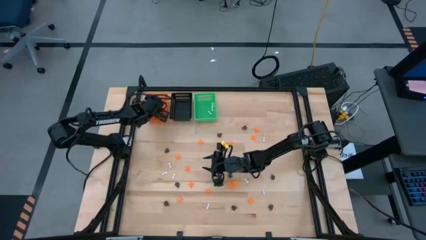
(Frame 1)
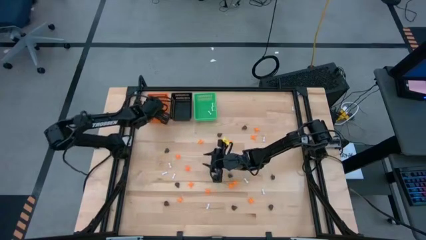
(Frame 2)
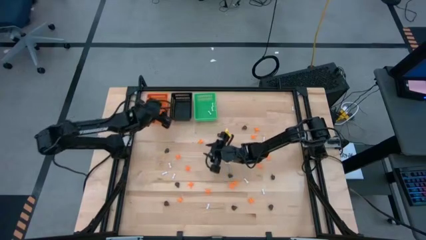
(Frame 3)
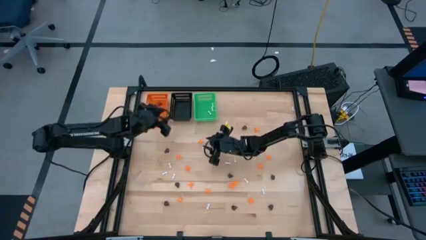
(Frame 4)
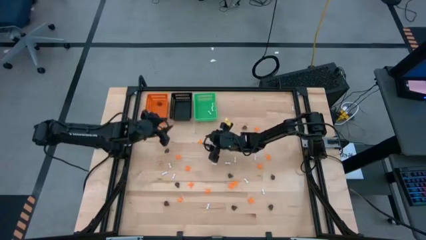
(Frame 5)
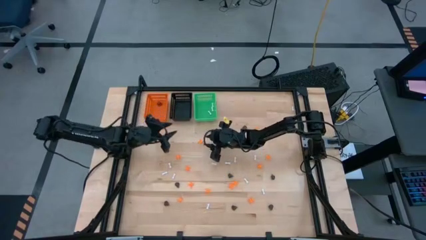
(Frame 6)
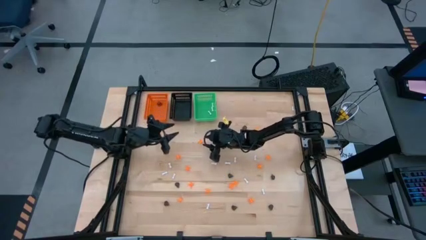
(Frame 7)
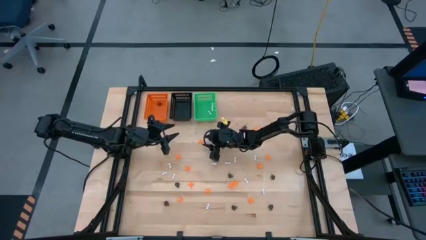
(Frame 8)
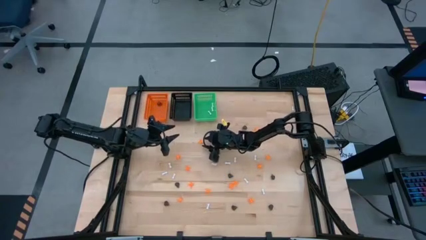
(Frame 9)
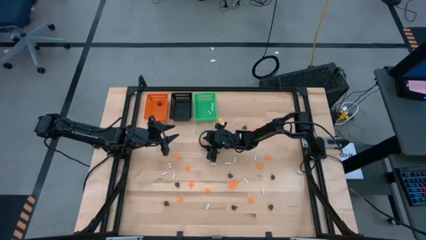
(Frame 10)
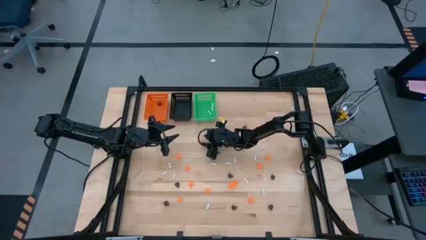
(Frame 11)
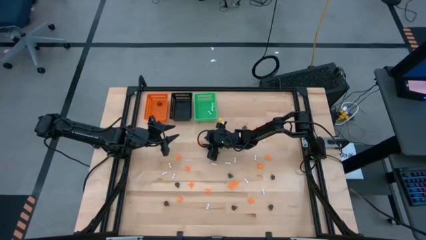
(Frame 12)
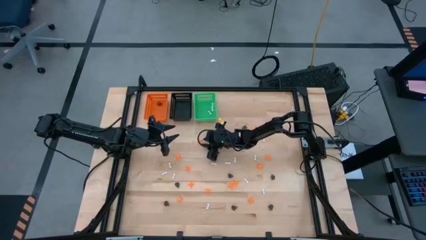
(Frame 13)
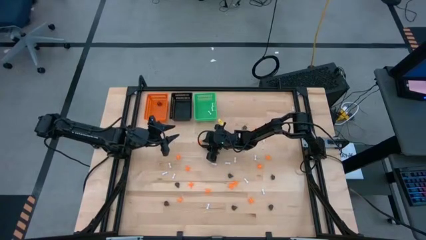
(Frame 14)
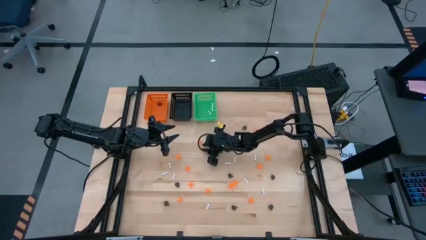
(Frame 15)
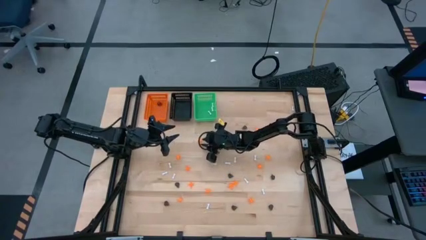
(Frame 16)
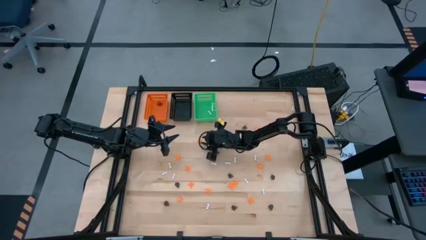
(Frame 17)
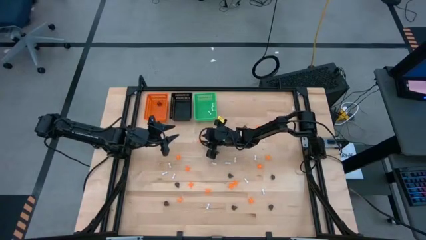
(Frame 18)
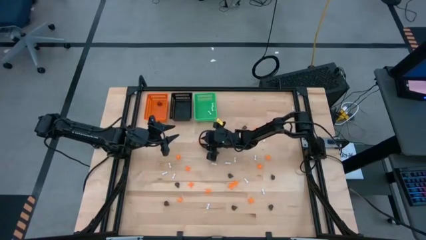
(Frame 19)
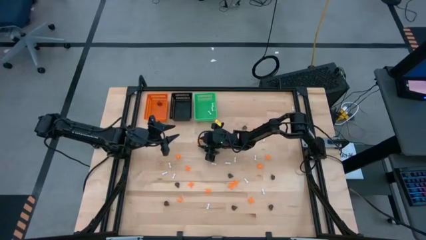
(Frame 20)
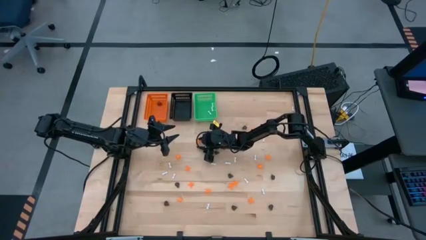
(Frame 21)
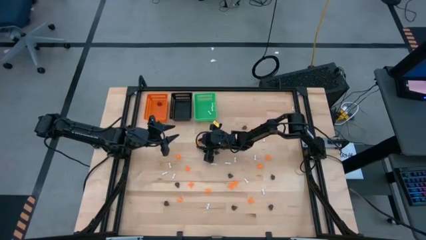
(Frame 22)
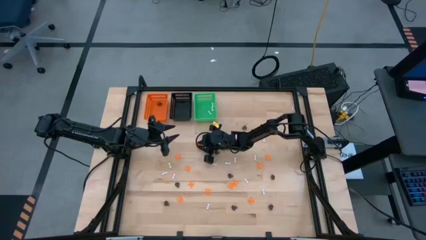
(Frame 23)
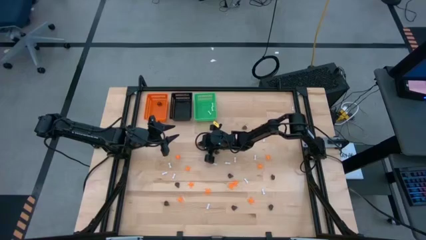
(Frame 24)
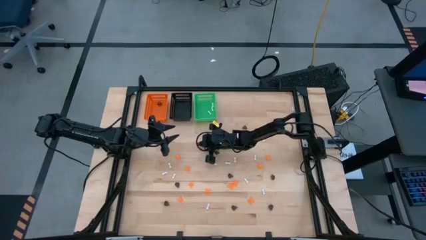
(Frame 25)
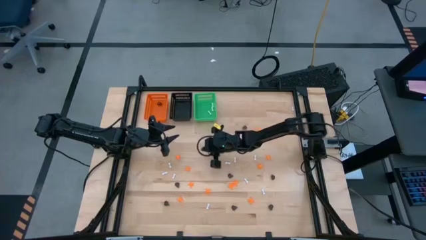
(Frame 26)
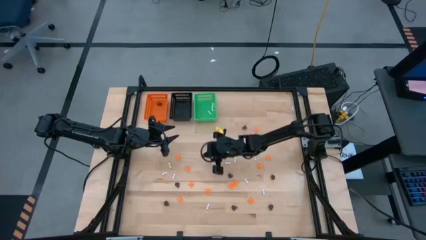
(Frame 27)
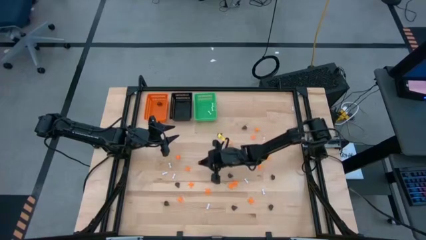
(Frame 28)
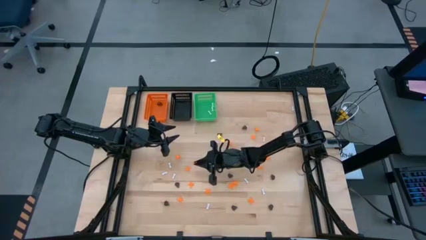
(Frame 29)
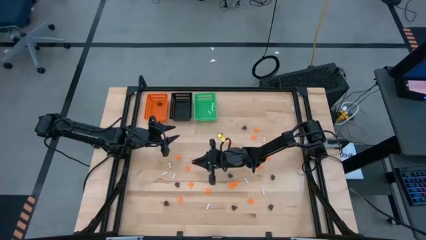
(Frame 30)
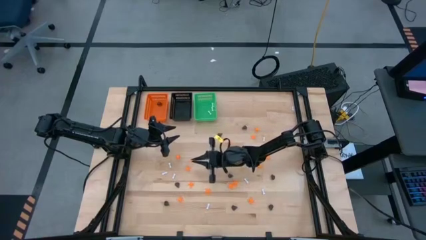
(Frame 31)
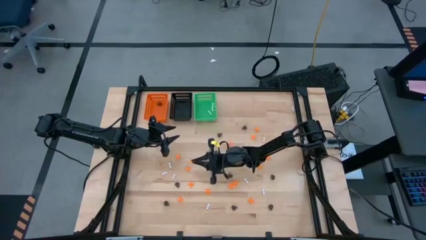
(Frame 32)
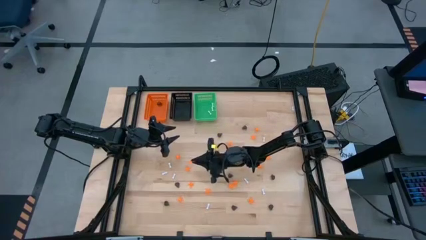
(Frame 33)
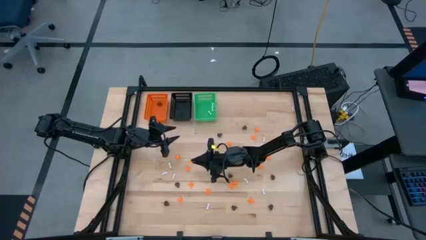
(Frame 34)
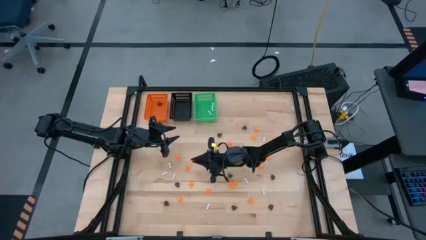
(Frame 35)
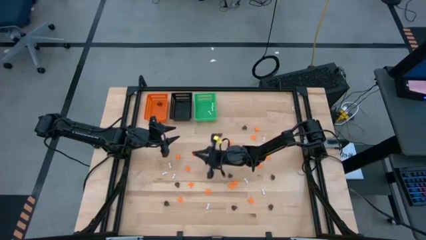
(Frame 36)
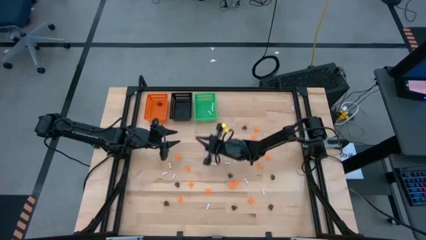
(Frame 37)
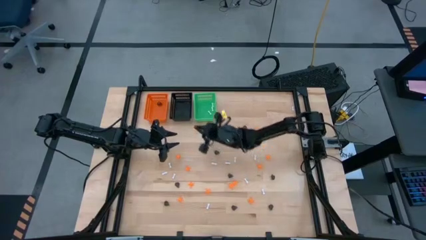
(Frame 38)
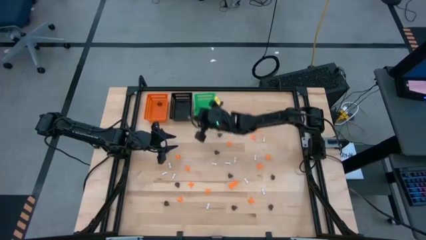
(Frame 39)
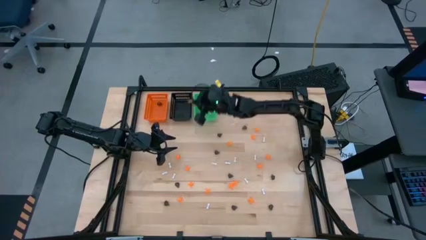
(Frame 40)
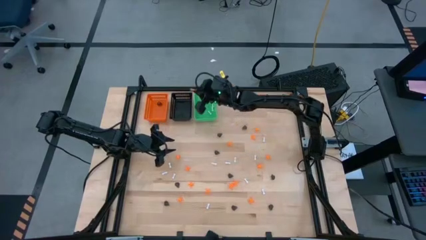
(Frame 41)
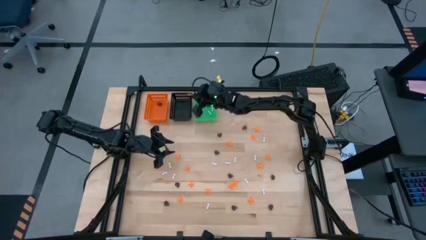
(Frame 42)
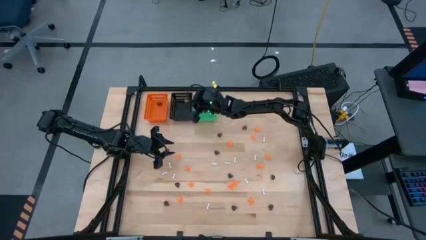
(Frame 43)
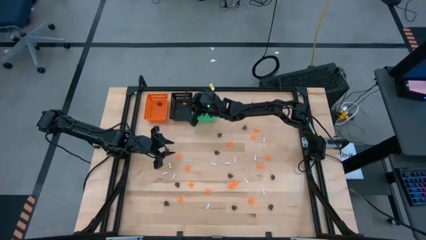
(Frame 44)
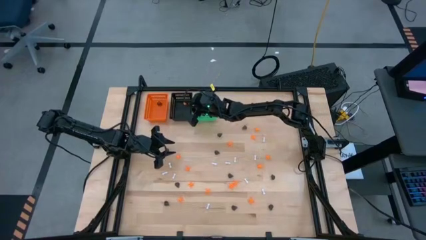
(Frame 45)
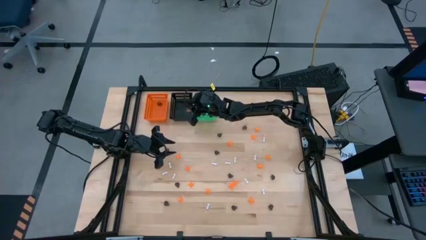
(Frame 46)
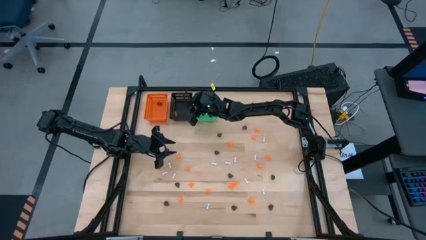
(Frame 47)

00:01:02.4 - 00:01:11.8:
Task: Sort Halloween decoration
Put the orange spider toy into the black bin

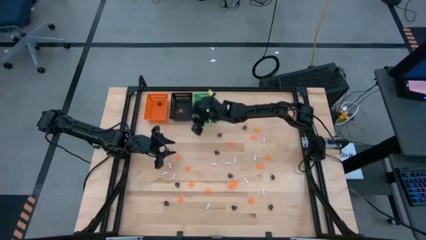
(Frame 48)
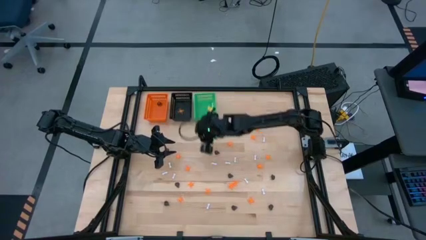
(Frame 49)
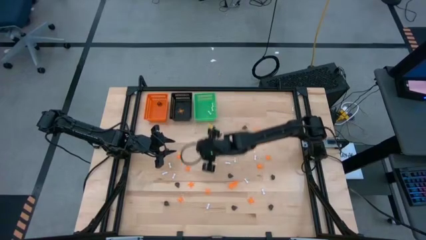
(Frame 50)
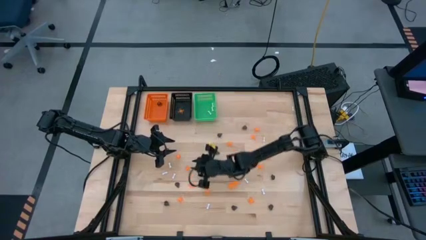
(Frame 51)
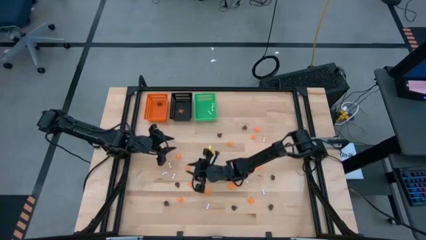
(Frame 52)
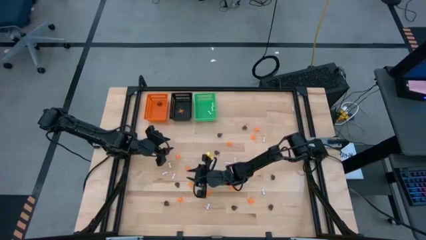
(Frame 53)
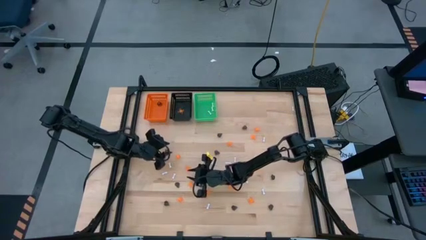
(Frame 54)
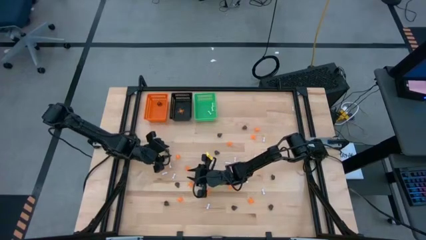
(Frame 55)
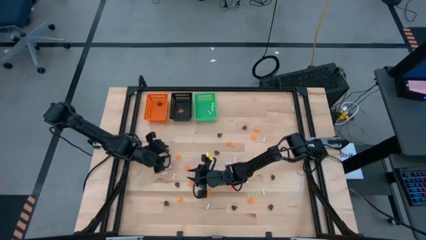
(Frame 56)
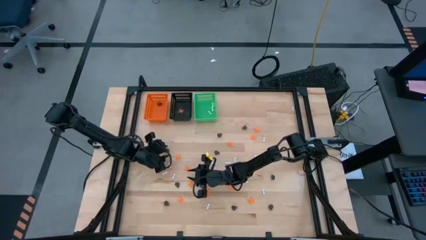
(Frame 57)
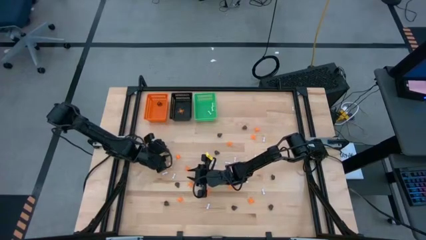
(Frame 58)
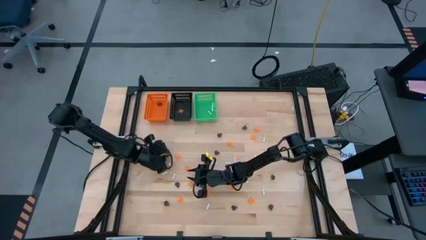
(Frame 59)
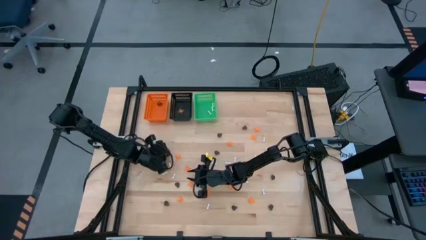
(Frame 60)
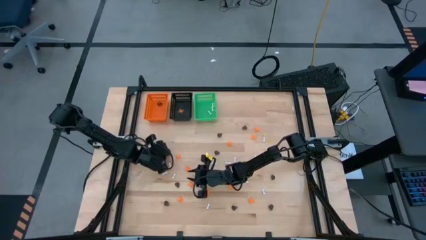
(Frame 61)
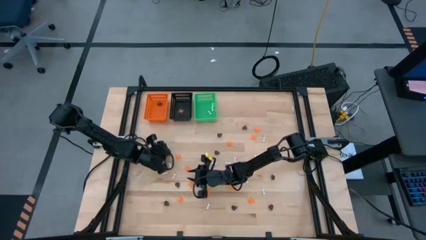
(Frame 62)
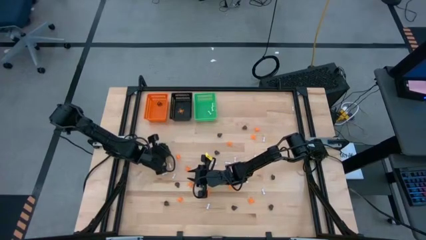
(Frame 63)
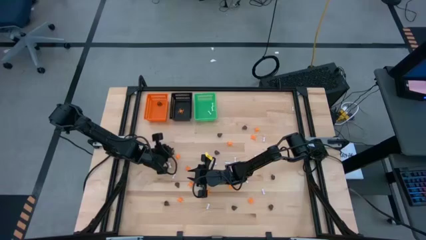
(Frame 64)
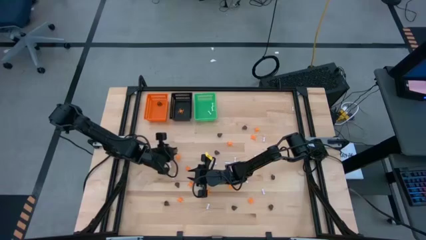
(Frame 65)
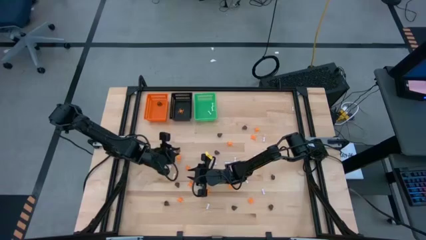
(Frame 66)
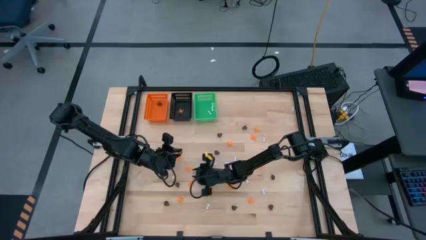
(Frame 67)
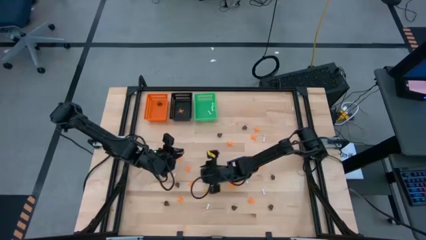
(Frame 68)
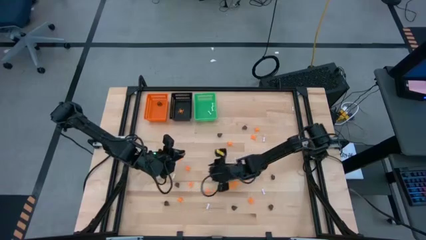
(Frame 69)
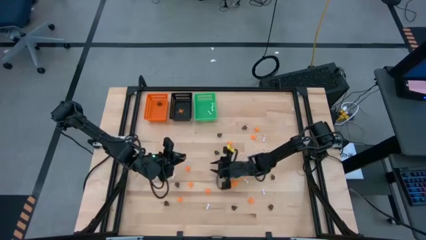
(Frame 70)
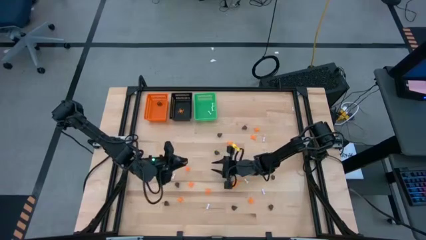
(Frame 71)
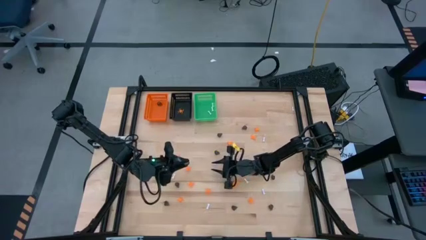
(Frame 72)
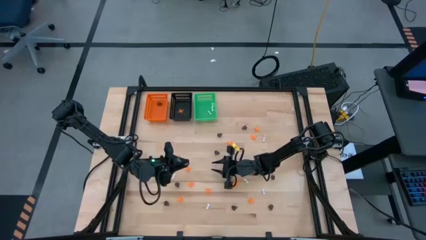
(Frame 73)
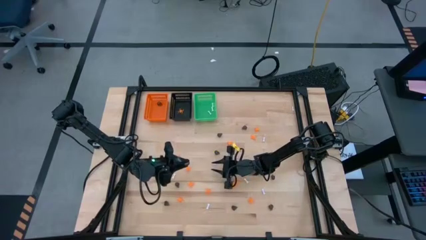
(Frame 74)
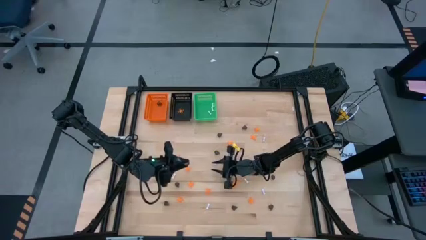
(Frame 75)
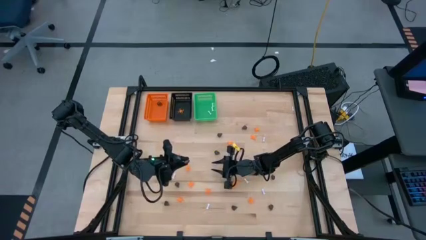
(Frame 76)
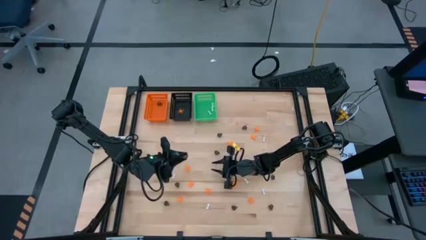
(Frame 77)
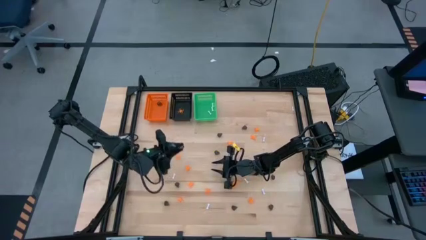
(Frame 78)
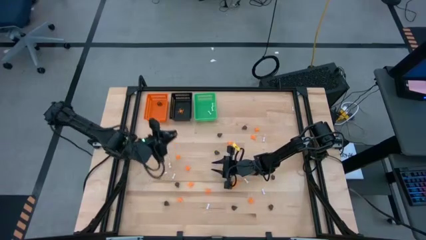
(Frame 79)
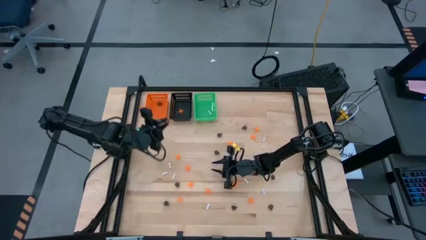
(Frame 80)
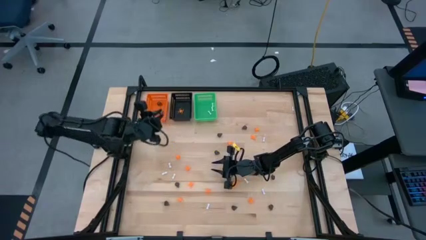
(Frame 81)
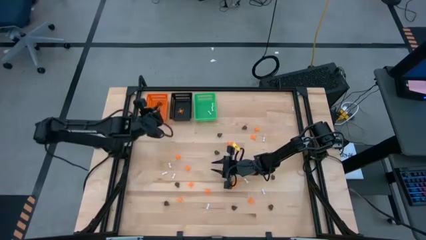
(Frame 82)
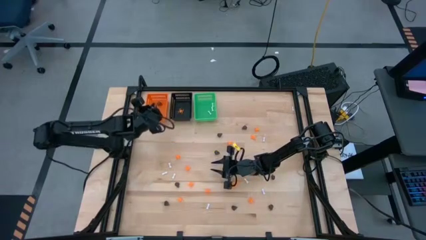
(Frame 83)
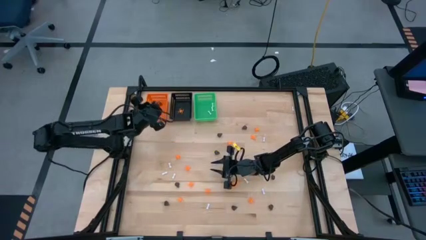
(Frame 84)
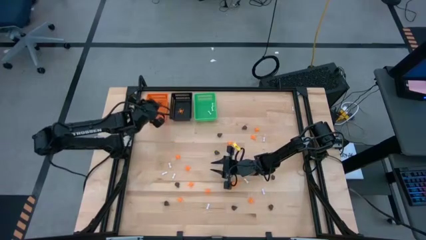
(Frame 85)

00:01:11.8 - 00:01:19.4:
Put the black skull toy into the orange bin
